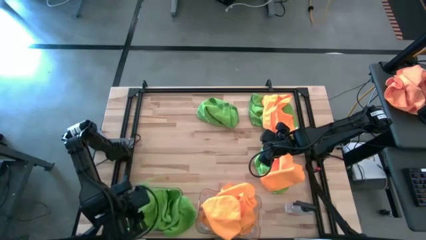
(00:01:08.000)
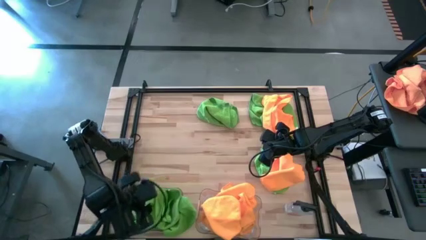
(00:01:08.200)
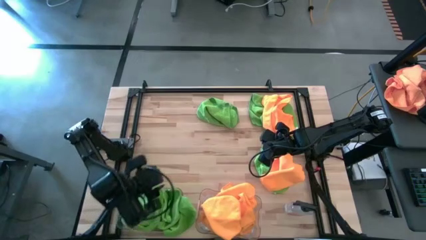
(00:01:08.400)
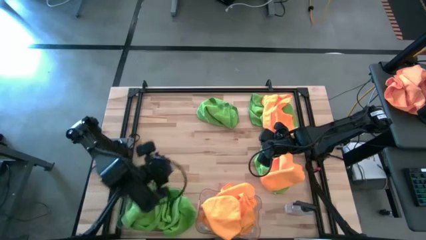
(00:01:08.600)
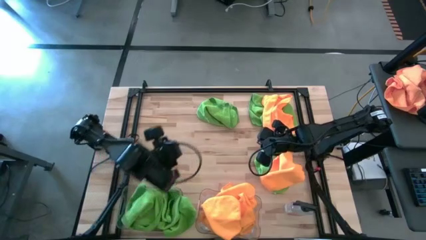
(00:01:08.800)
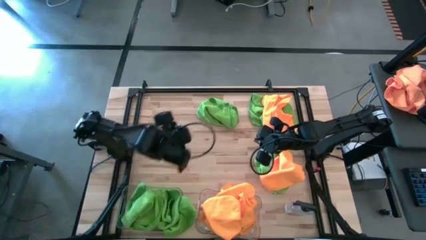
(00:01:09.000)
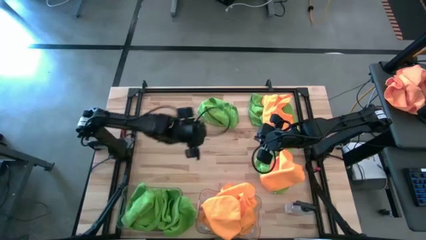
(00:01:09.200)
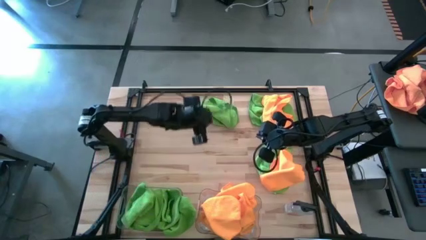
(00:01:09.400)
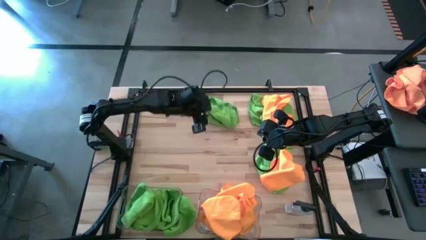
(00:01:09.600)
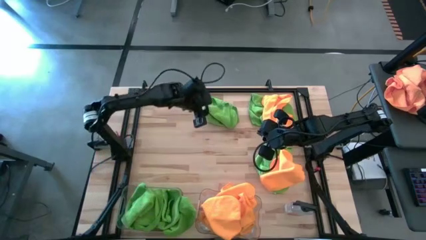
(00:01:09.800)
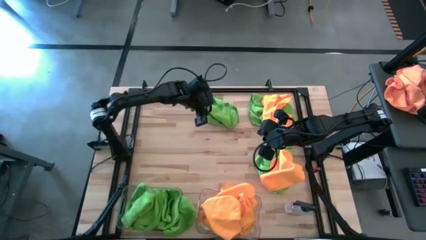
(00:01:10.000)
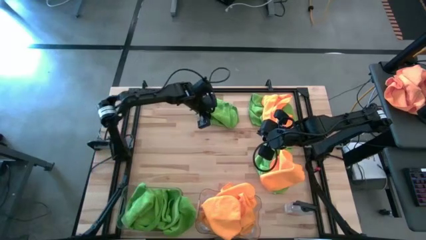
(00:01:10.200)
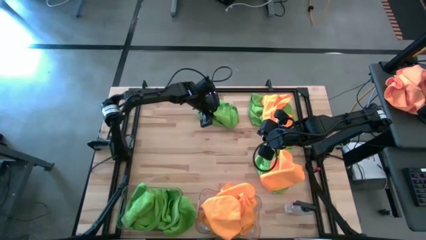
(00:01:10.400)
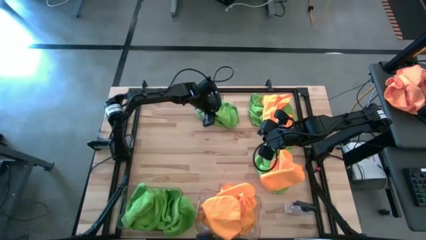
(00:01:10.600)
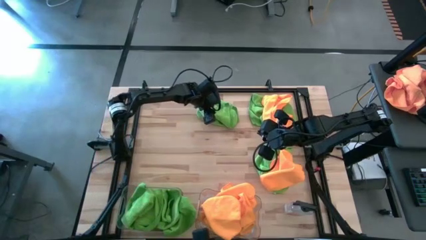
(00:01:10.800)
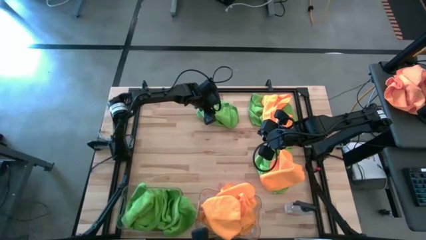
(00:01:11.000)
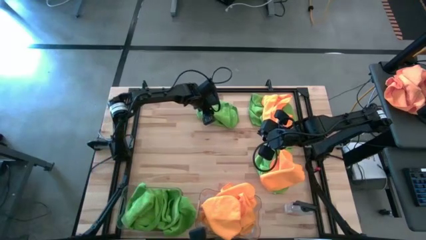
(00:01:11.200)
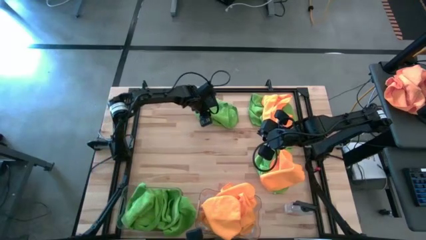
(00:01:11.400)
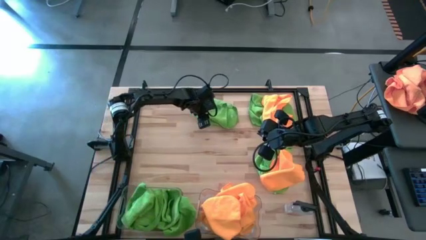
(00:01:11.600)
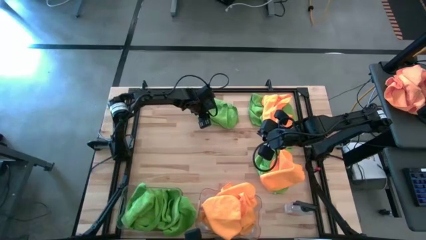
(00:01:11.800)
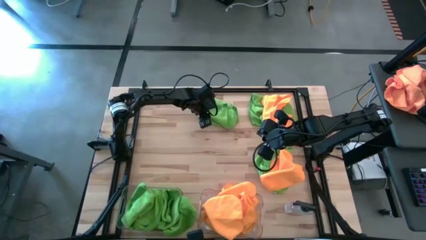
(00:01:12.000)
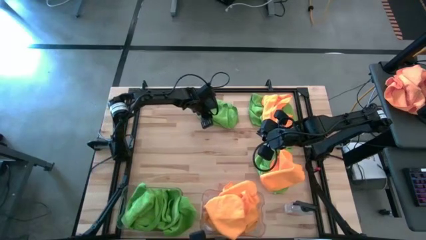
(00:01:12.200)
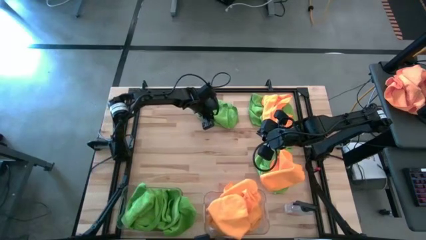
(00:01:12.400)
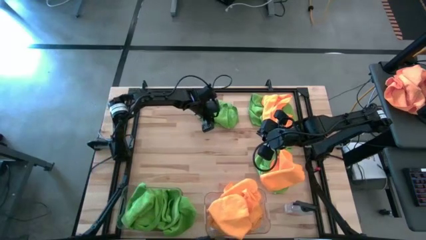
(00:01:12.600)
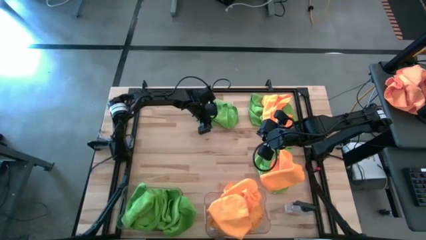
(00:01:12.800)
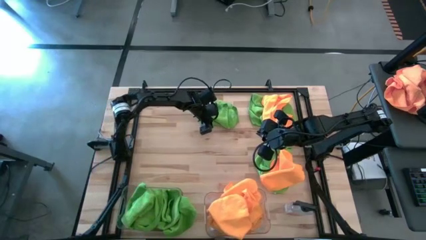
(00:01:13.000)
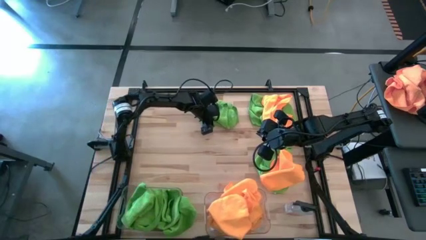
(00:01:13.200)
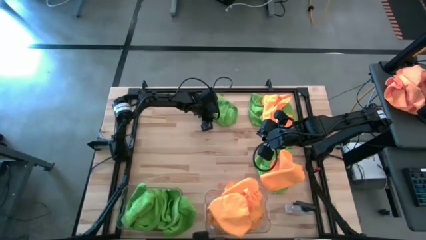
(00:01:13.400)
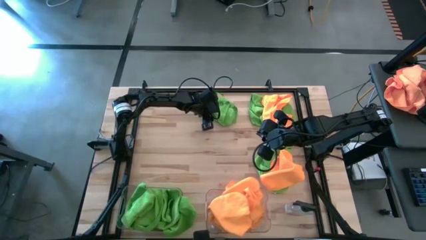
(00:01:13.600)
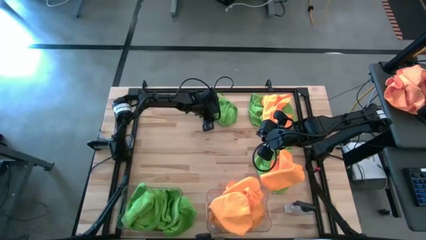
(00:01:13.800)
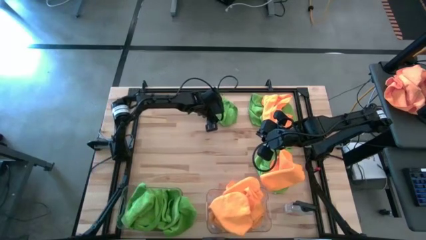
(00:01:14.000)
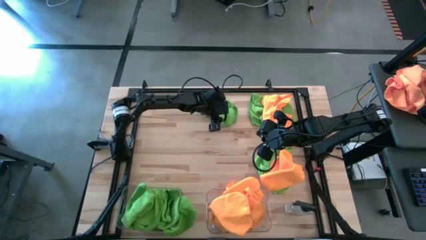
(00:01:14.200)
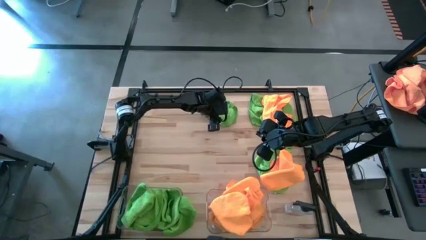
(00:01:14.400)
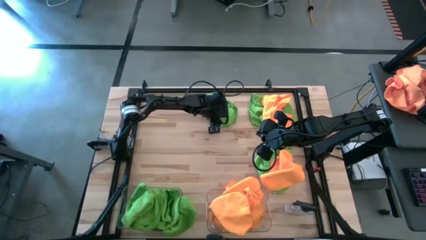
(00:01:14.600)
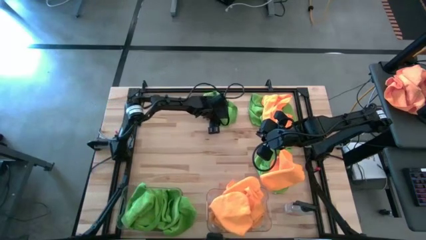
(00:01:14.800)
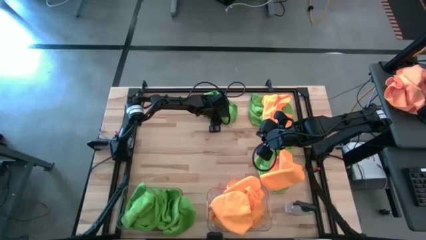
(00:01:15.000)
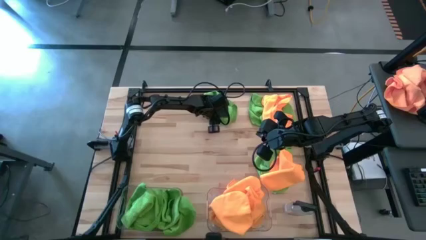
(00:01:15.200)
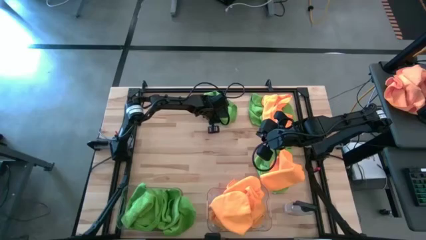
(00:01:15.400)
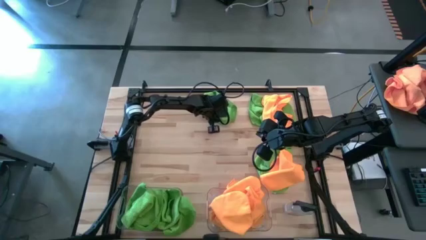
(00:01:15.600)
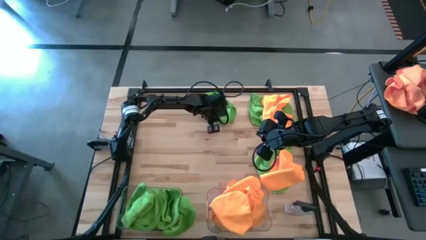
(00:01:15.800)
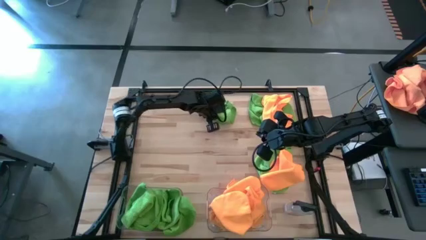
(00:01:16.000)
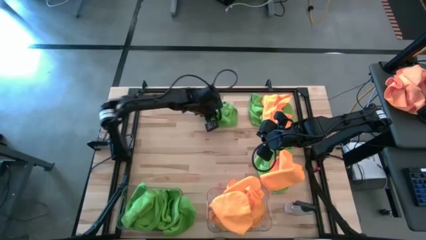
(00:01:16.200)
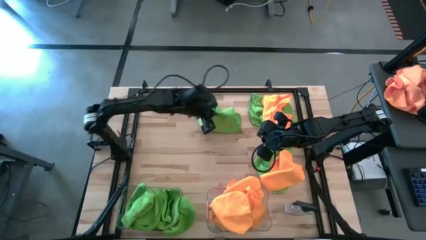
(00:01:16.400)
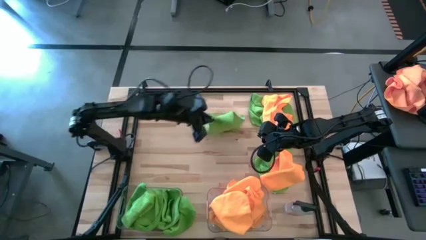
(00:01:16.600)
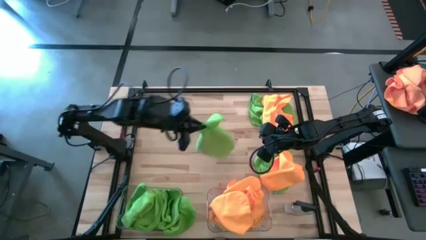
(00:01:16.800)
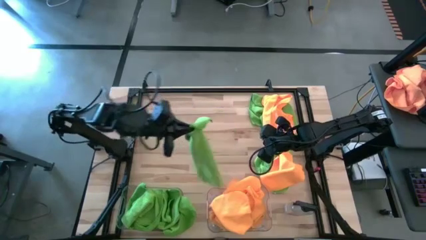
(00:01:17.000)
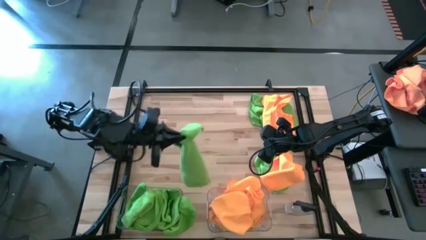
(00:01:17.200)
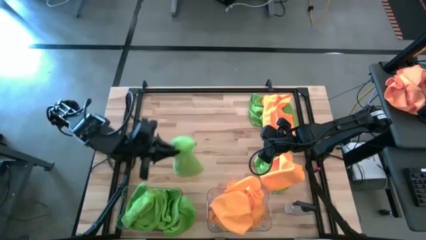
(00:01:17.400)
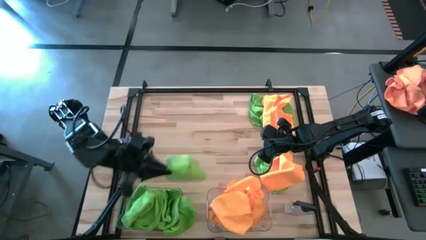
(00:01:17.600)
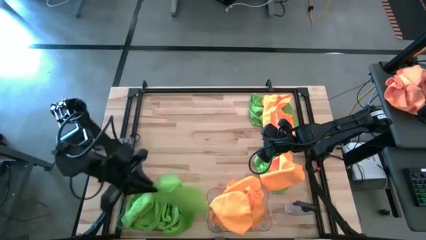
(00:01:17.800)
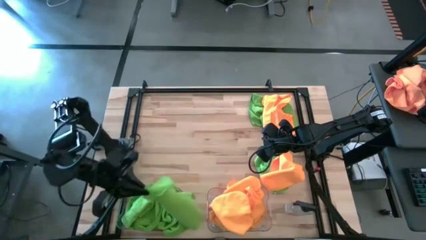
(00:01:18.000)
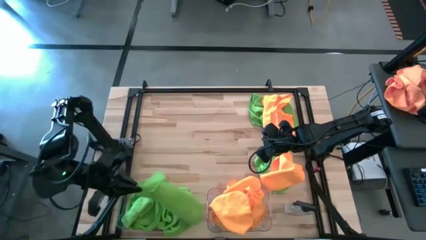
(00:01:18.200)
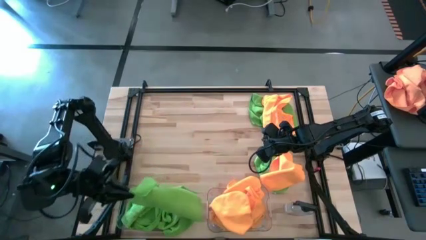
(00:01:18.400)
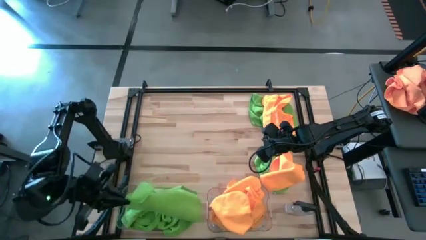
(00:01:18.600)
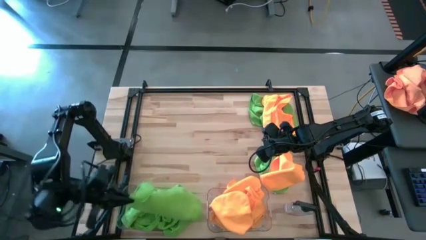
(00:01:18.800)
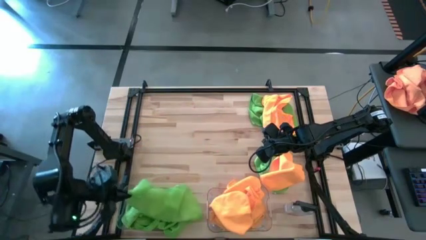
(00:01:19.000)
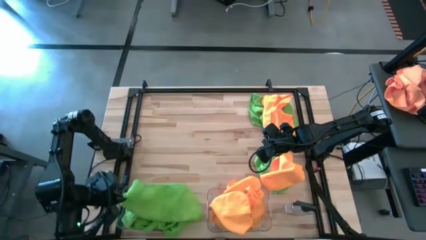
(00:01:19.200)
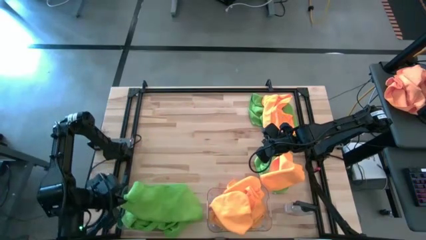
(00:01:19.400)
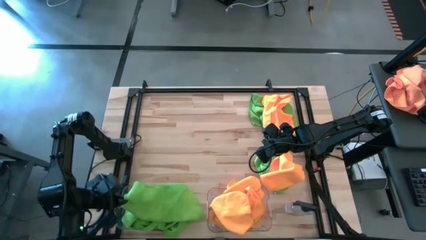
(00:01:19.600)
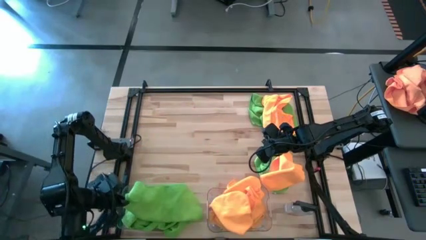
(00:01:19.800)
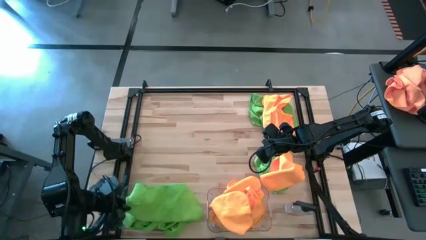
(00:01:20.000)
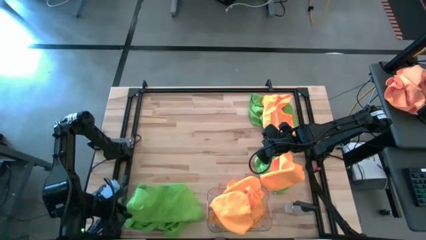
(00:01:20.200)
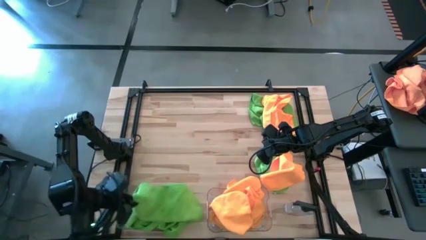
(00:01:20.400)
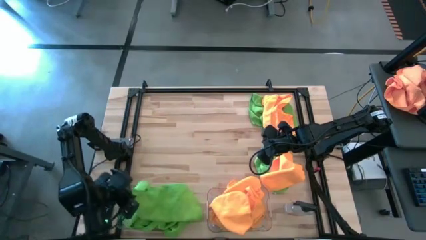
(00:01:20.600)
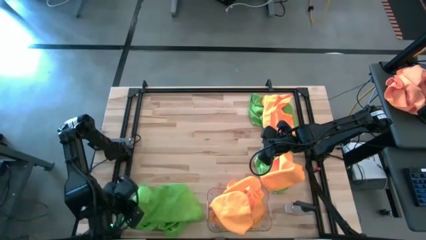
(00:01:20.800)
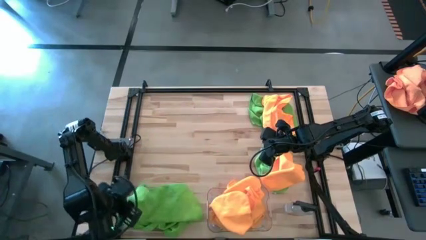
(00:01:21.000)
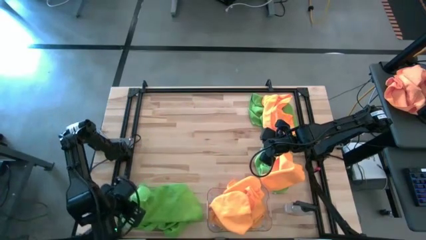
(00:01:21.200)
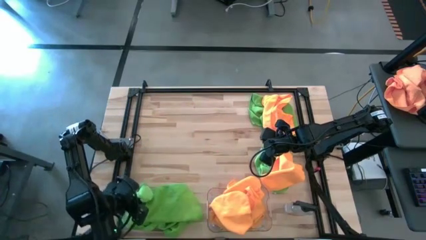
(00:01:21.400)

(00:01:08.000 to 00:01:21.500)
Task: Sort microfiber towel by color & place in baskets
Put the green towel into the left transparent bin
